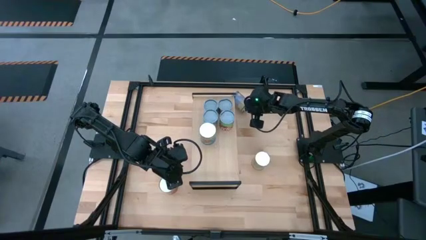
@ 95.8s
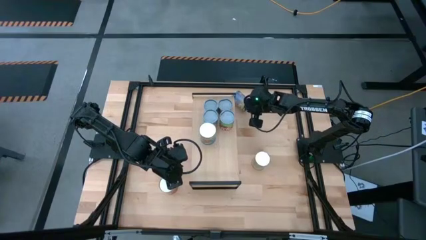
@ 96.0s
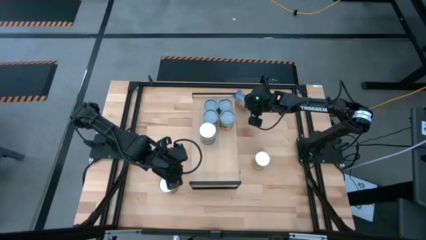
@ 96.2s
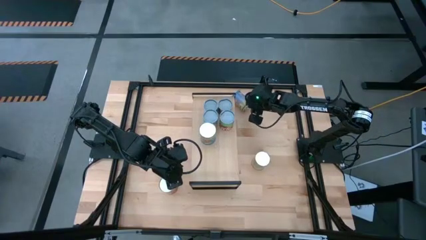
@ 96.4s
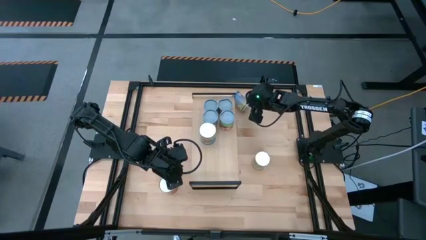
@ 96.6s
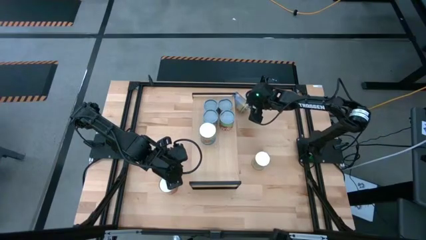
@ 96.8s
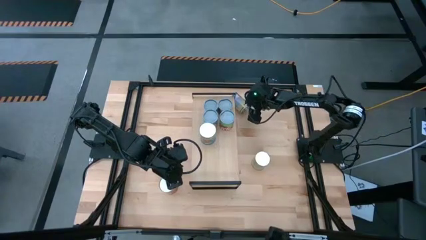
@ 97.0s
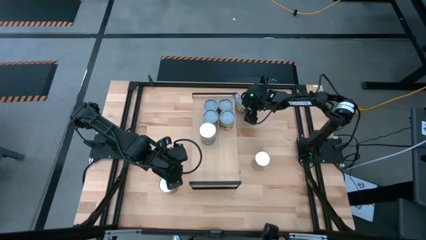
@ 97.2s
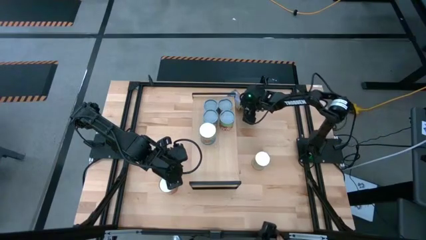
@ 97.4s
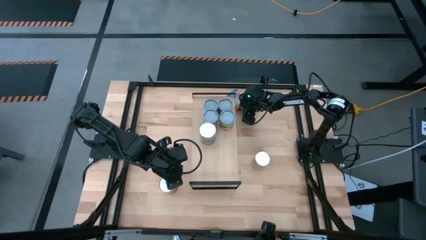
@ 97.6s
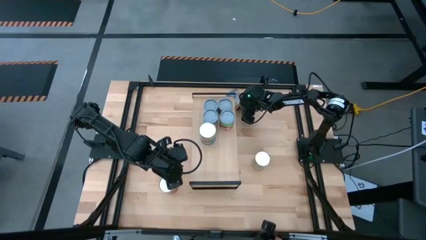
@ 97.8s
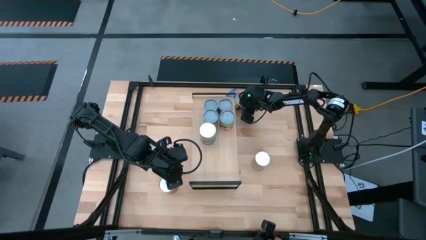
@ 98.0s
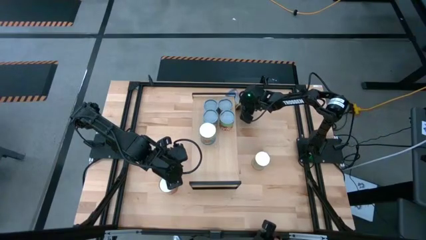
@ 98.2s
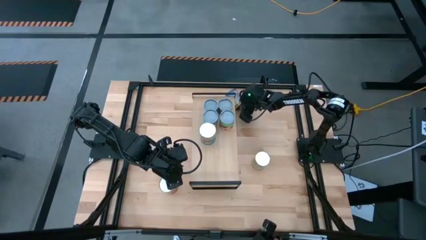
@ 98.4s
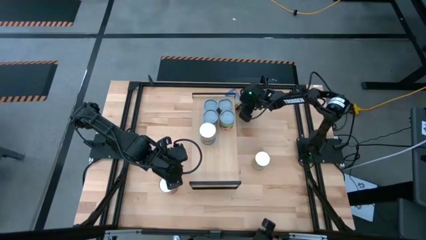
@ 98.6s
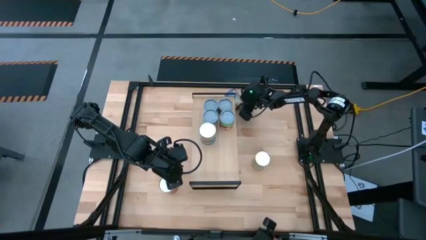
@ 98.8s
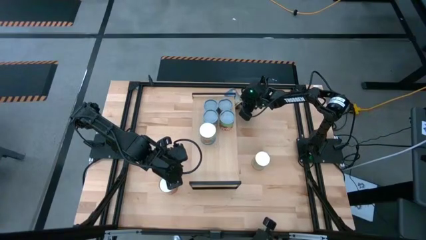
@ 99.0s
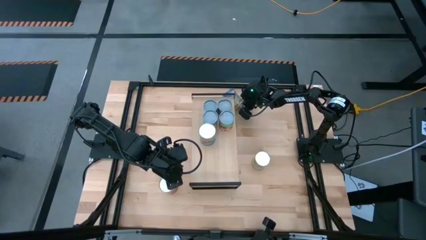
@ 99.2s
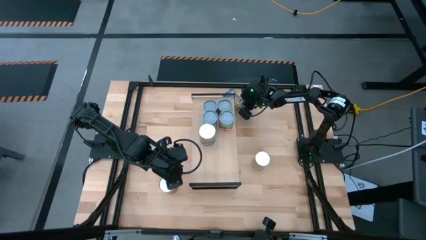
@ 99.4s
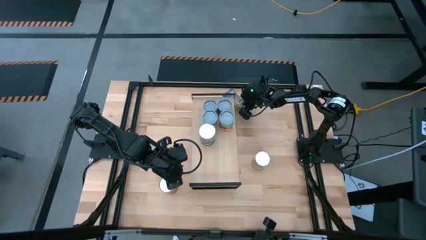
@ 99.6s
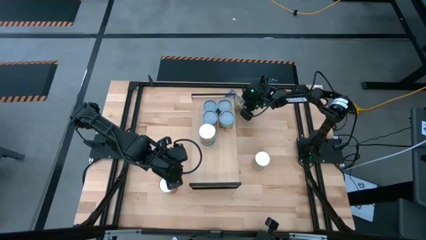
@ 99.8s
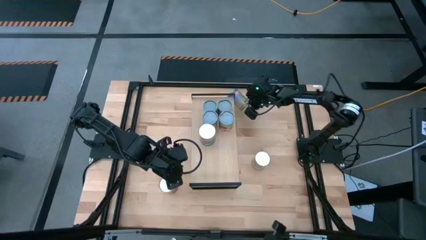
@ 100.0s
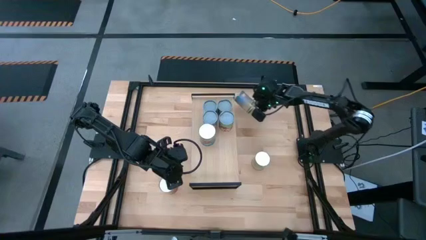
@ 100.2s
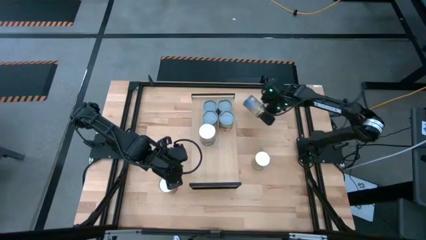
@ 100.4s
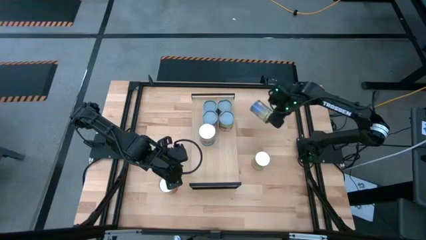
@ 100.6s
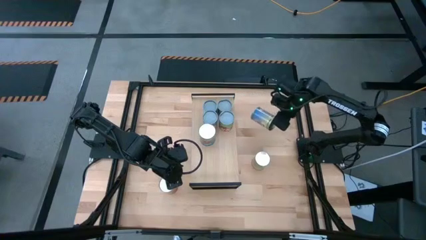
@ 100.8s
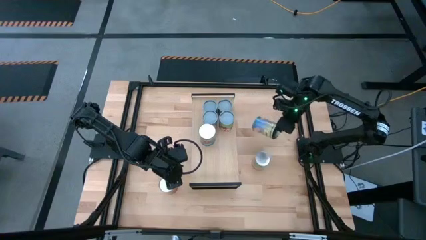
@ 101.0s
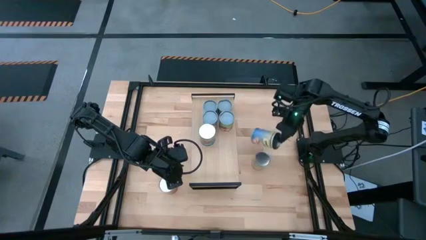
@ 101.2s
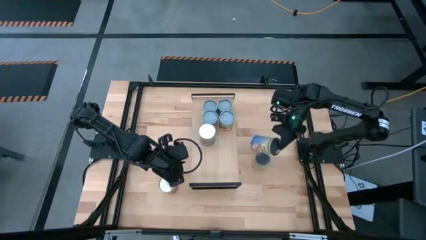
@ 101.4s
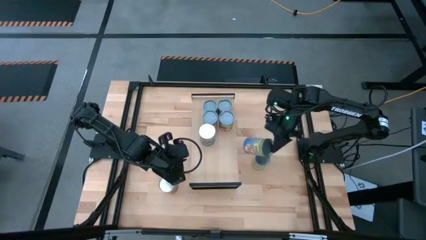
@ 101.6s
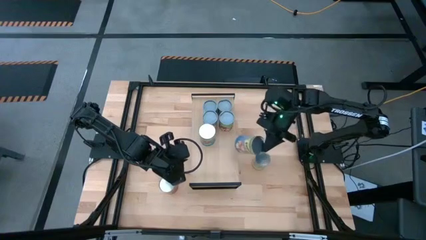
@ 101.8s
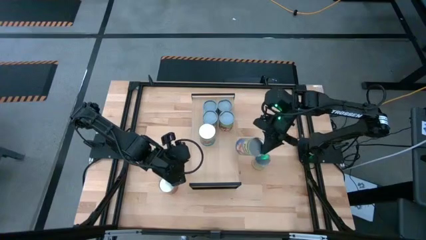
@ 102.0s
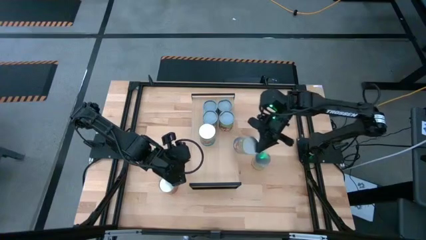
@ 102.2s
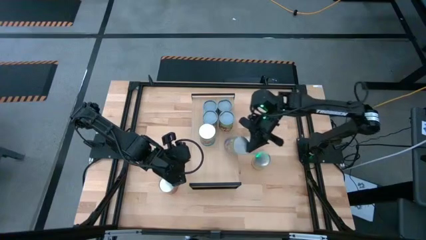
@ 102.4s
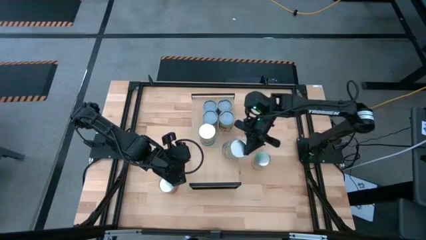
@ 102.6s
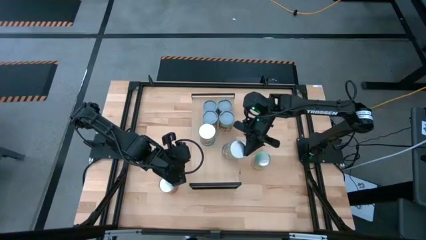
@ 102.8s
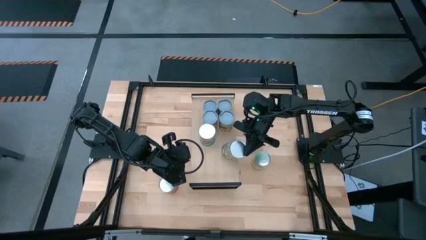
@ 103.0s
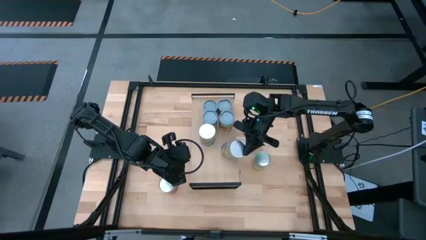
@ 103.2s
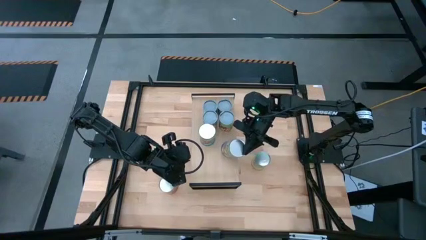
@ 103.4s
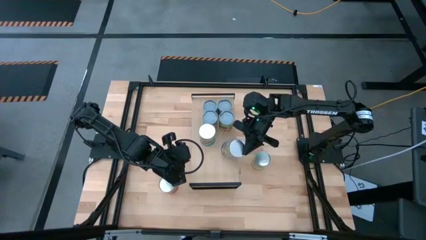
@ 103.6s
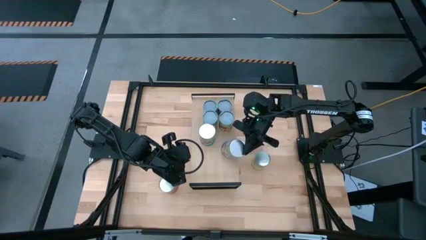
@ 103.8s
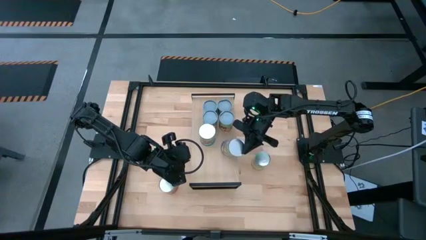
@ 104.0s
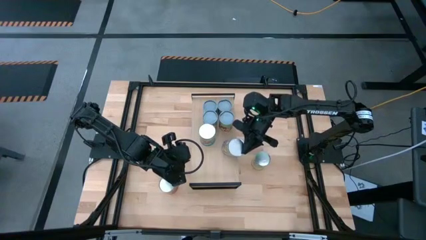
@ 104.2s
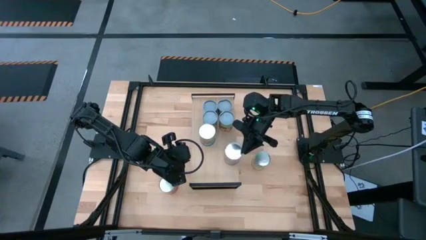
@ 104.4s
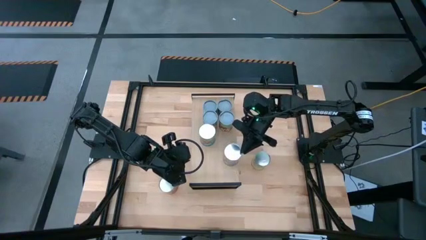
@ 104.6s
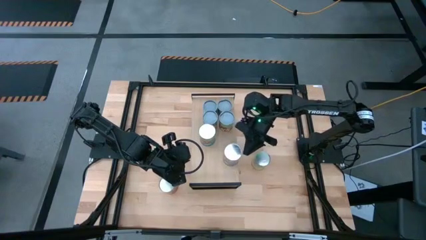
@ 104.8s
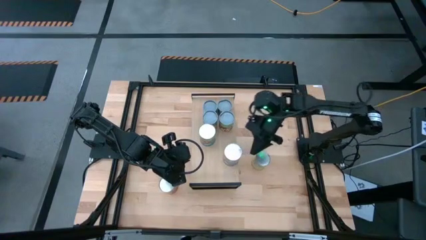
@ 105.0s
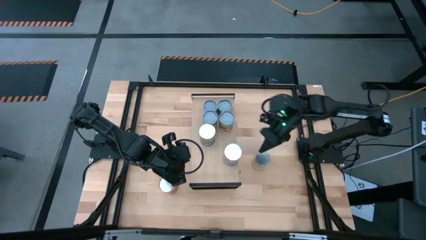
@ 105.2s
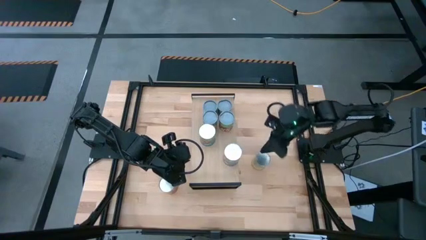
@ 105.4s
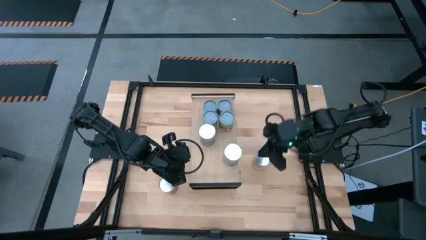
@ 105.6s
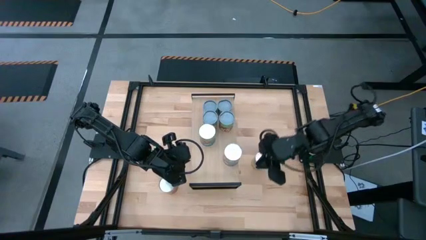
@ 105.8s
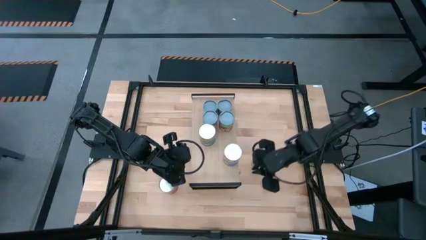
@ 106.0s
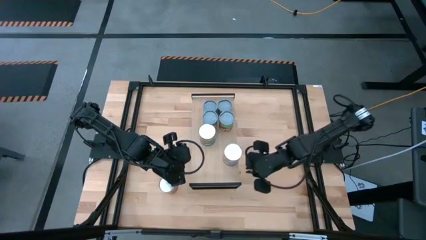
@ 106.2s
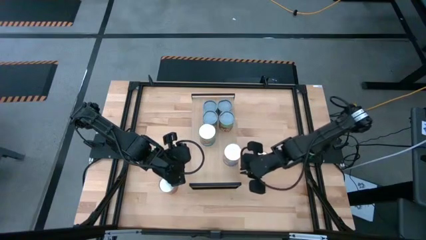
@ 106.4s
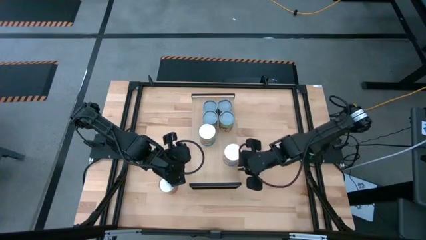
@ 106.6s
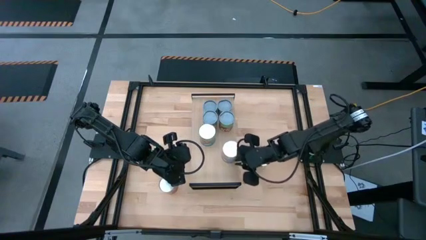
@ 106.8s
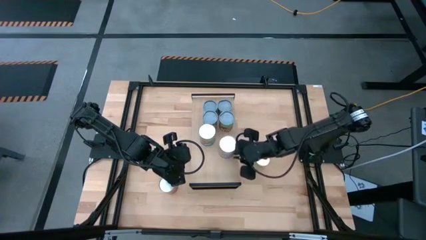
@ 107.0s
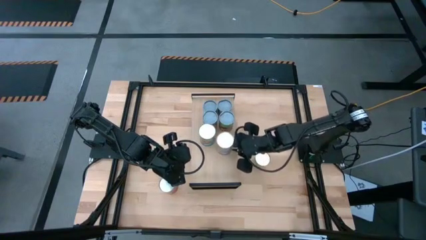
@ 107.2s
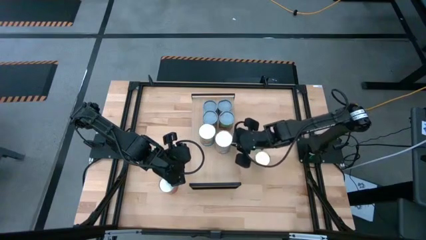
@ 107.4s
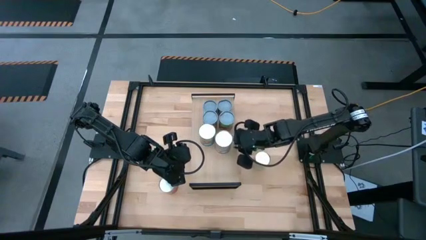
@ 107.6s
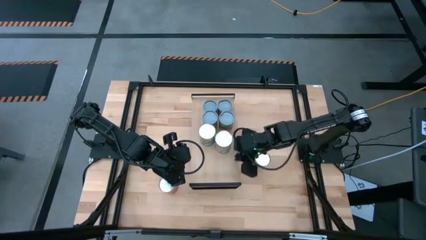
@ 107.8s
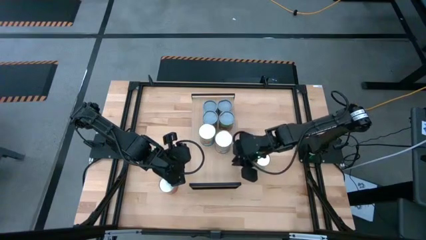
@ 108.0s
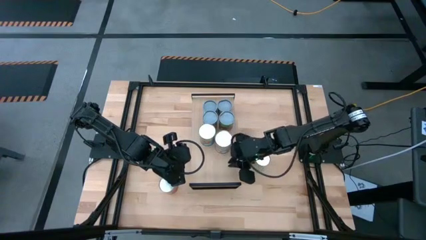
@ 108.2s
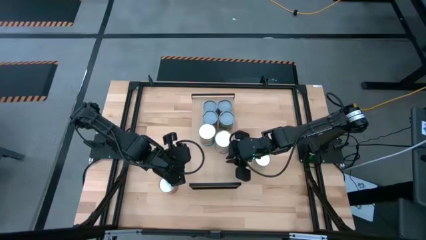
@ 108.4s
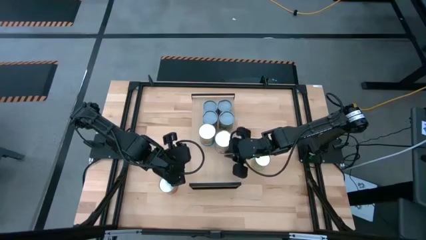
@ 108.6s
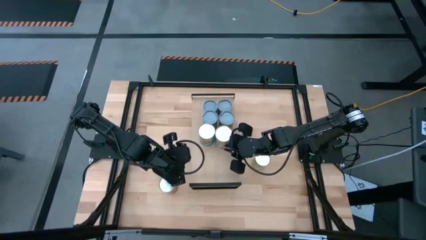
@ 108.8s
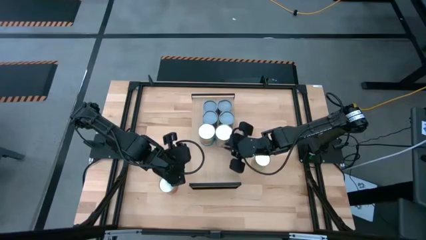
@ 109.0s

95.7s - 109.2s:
Task: Pick and place cans onto a shelf
Put the canned peaches on the shelf

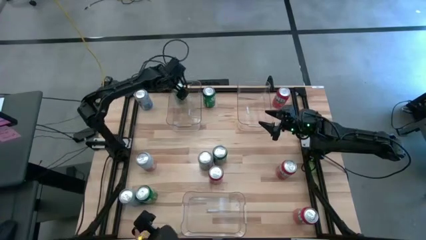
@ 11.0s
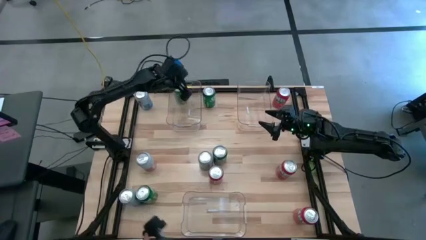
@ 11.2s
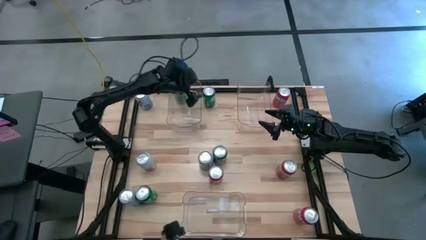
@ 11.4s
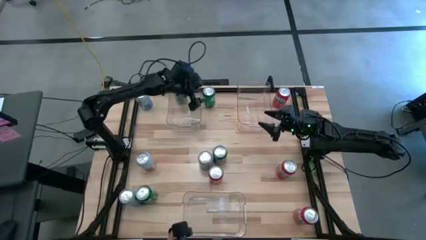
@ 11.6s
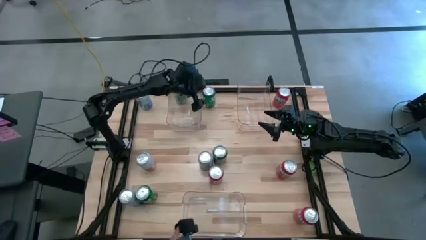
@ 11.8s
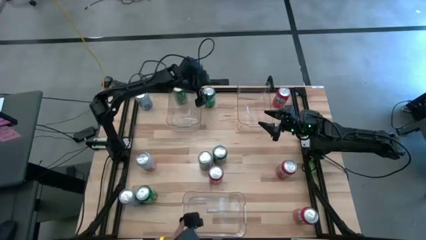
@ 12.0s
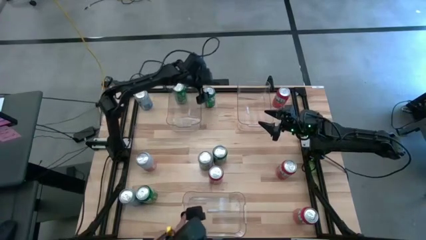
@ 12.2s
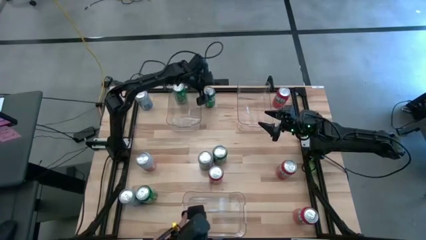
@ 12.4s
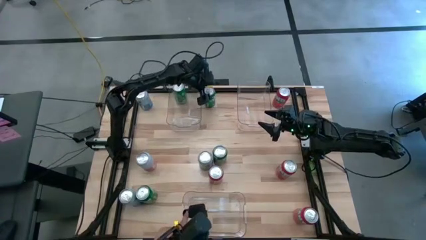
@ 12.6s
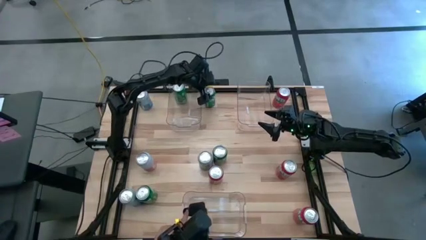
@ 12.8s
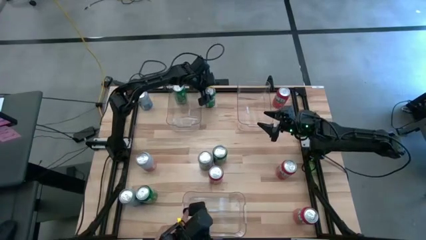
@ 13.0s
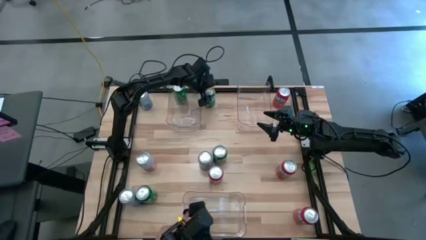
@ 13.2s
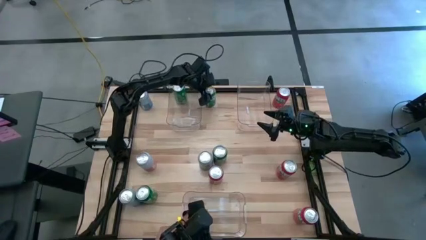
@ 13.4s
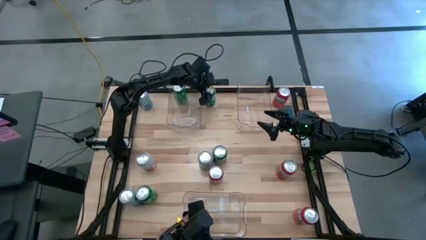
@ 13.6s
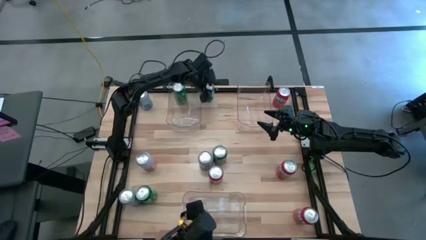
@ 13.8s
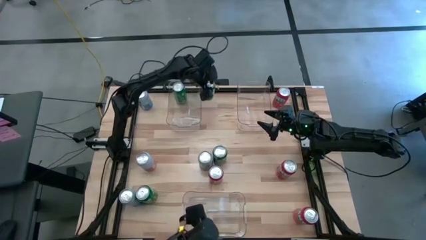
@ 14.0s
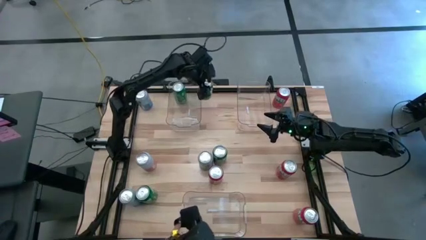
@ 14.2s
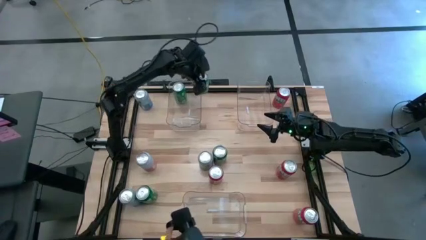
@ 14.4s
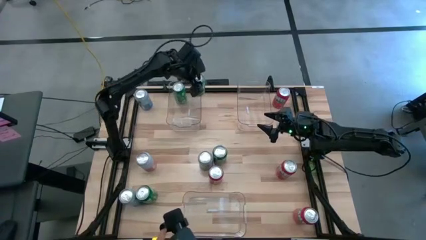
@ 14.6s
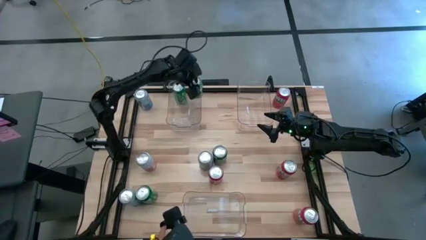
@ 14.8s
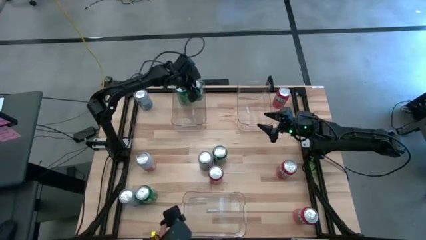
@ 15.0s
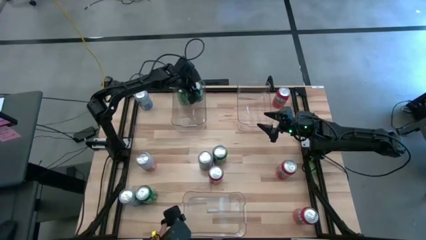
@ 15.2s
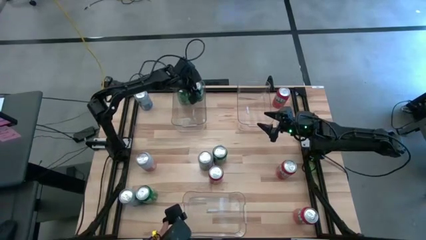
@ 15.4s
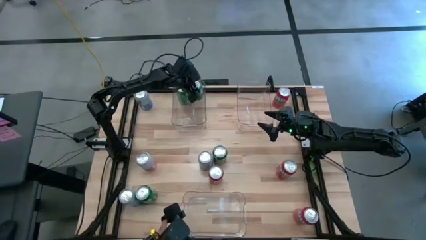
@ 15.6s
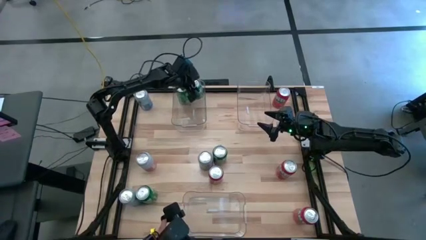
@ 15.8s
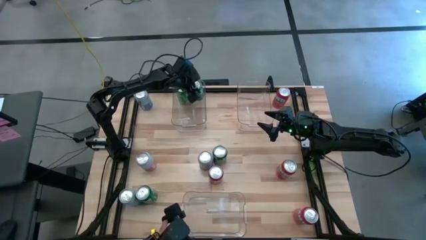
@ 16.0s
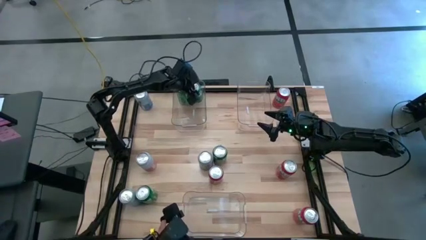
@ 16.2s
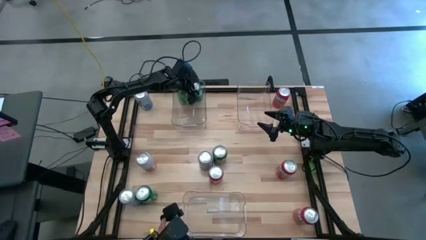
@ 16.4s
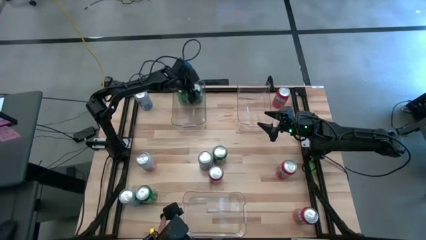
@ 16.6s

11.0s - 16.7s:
Task: Sort soda cans
Put the green soda can into the top left transparent bin
